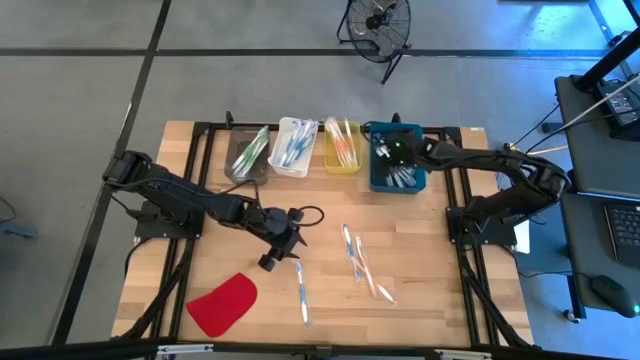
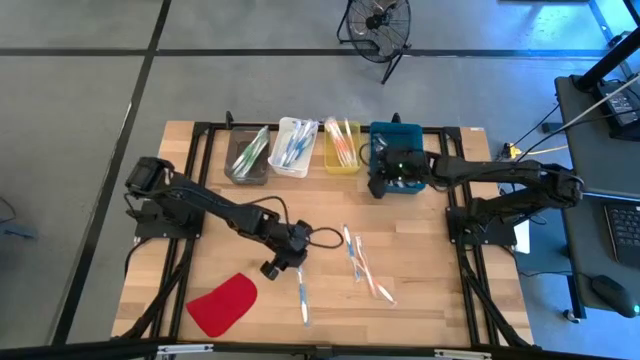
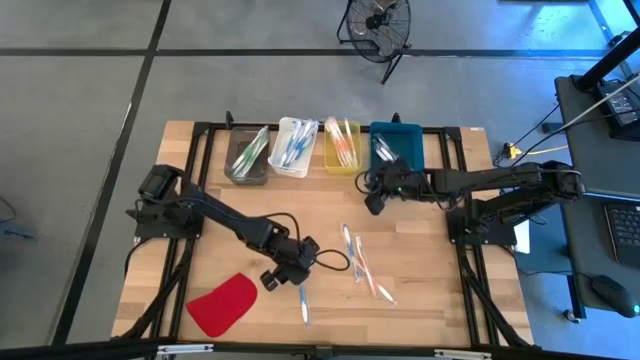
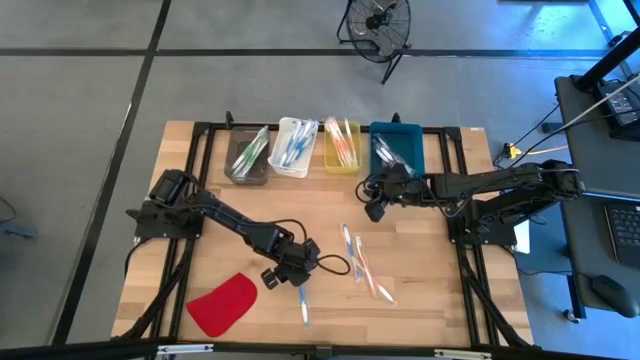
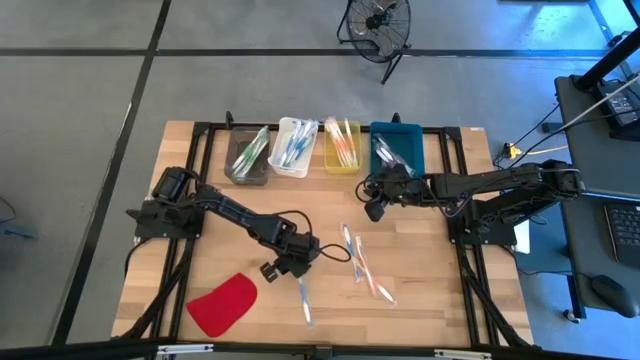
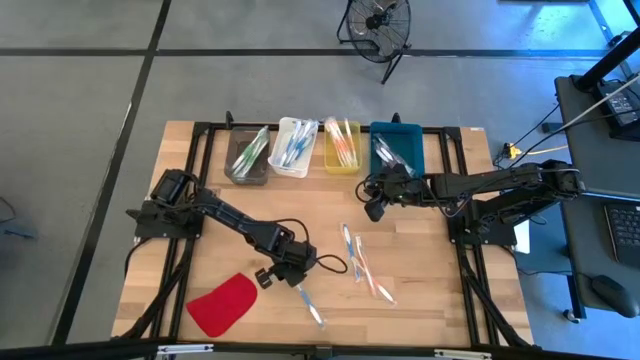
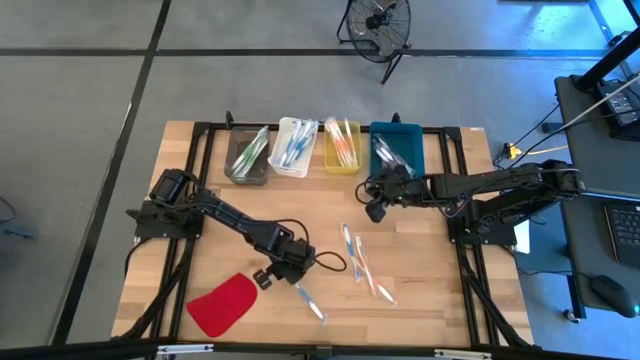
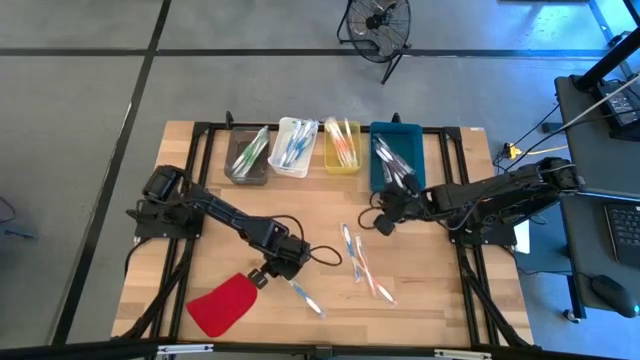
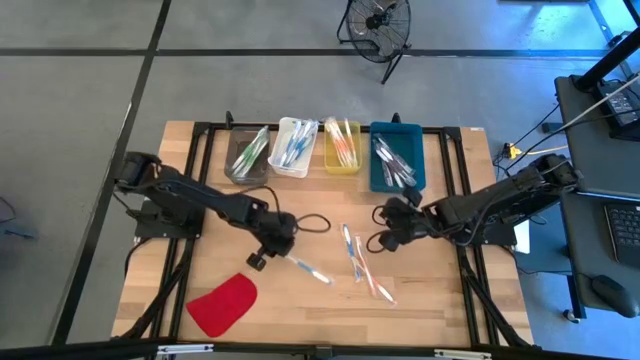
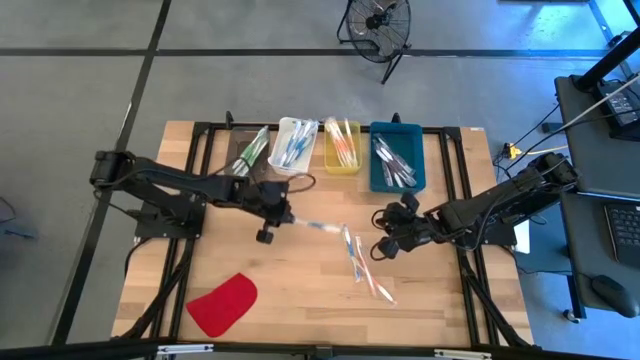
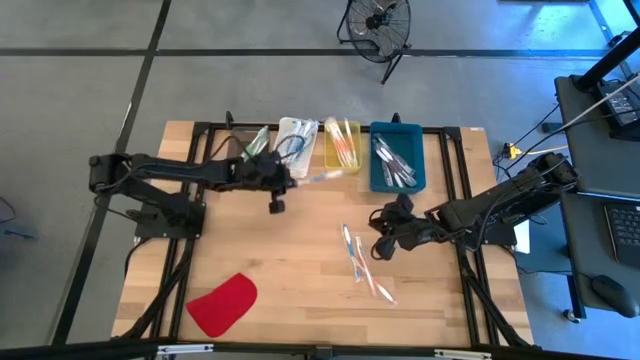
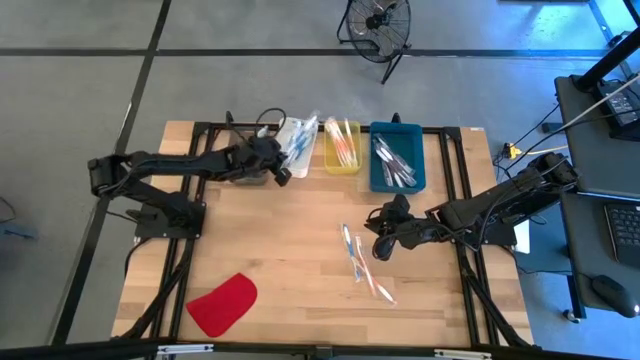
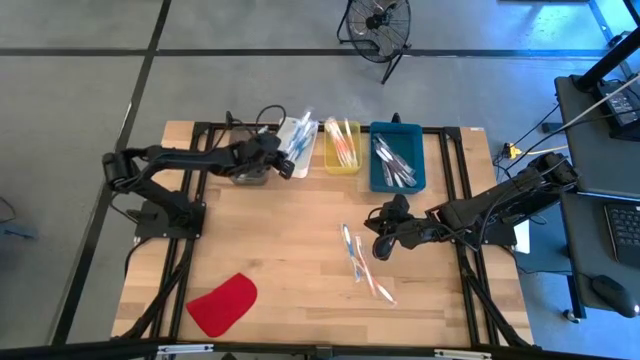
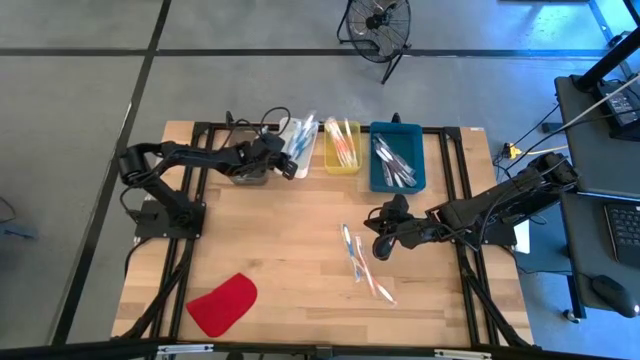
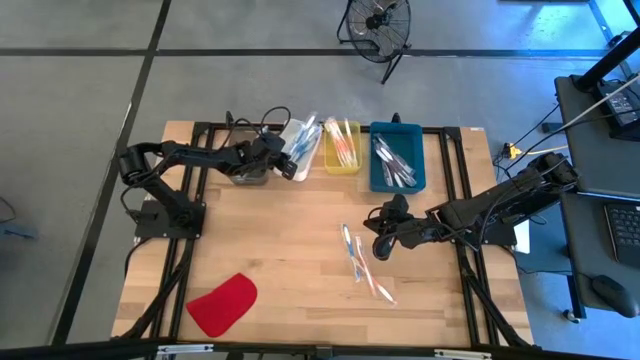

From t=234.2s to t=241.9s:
Task: Pick & Place Toothbrushes
Put the blue toothbrush into the white bin

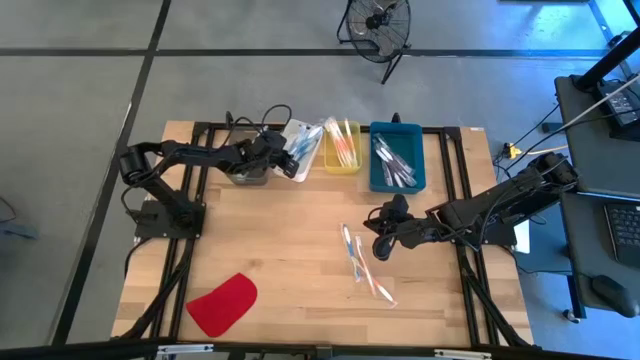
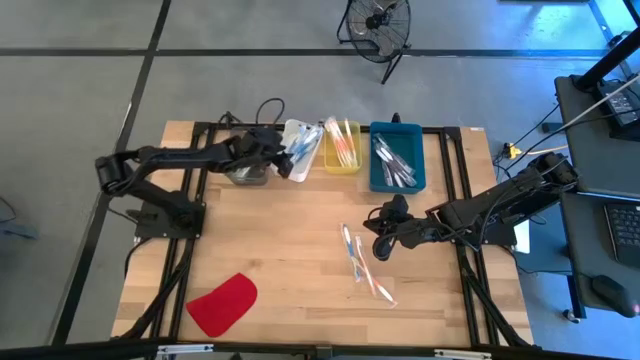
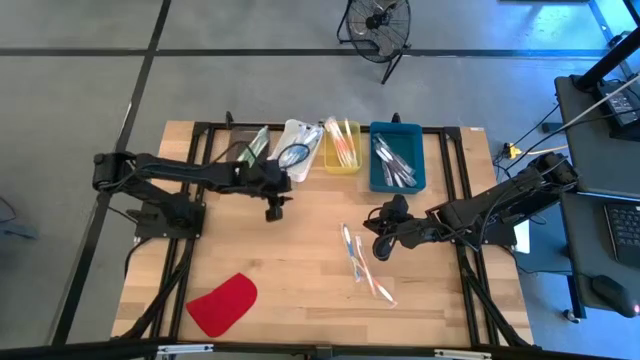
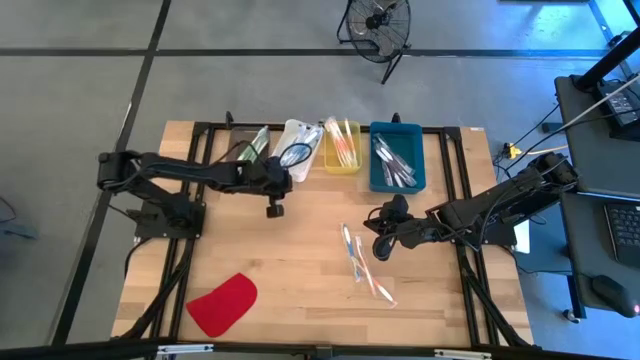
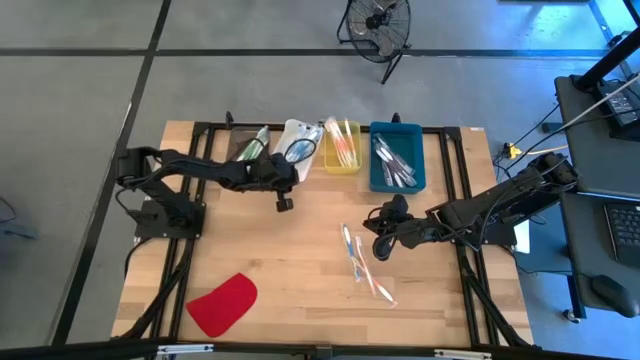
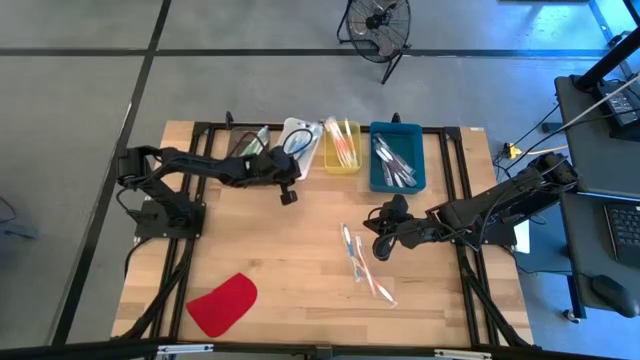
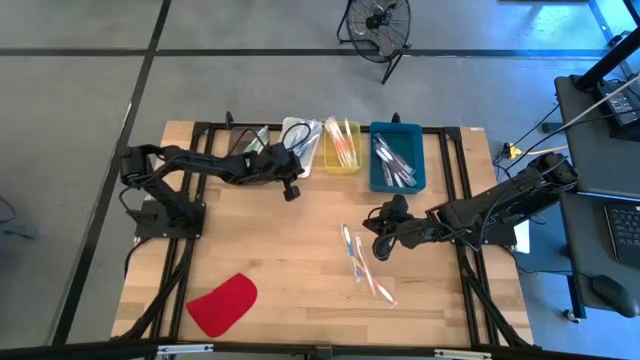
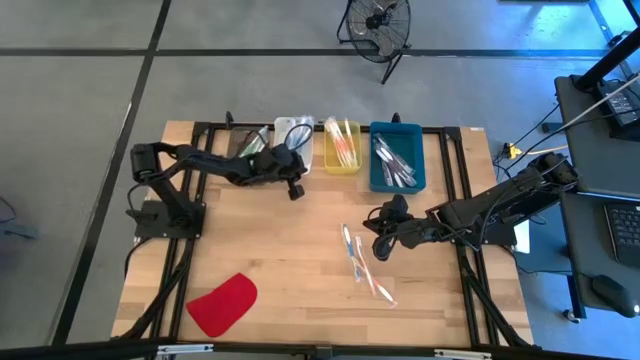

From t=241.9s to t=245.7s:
Adjust the white bin

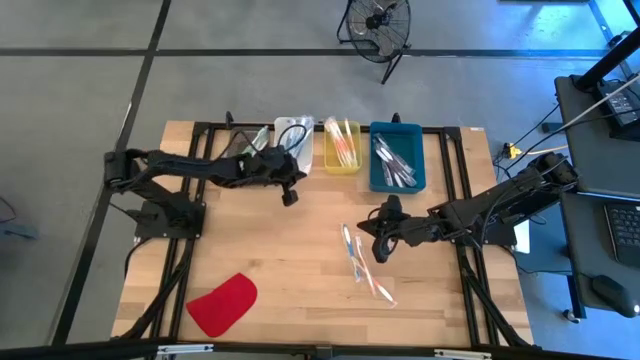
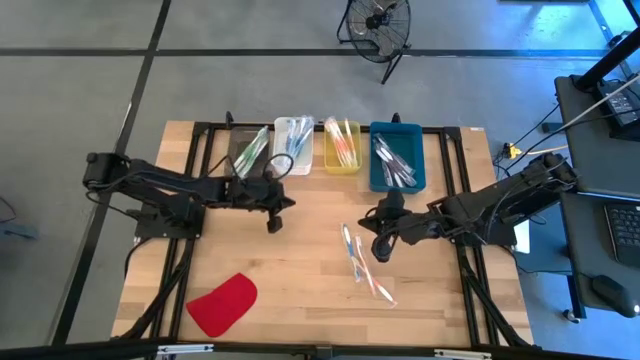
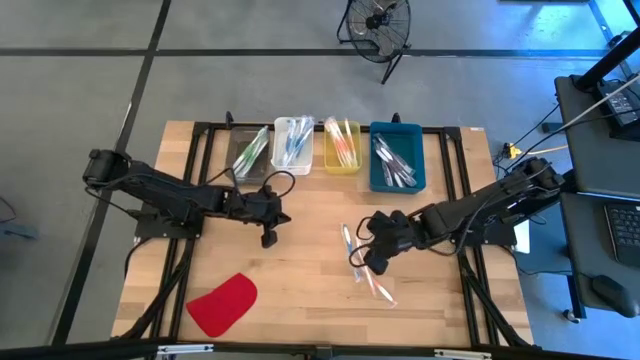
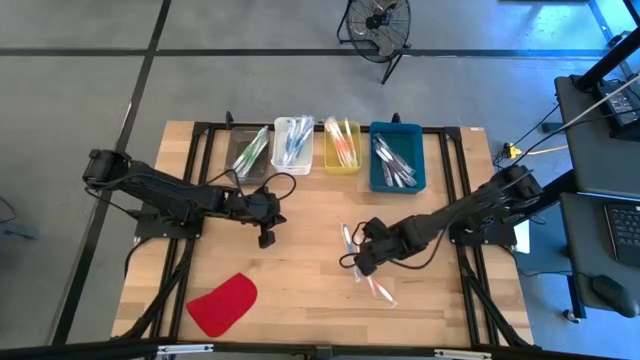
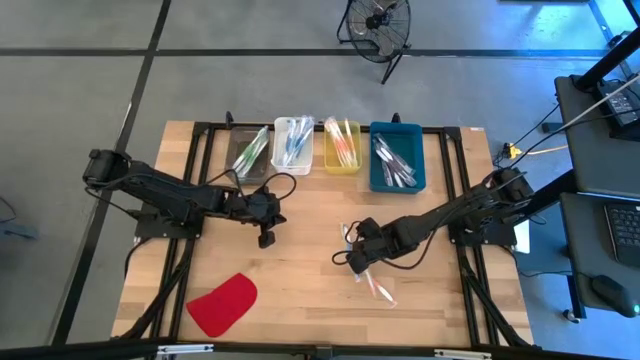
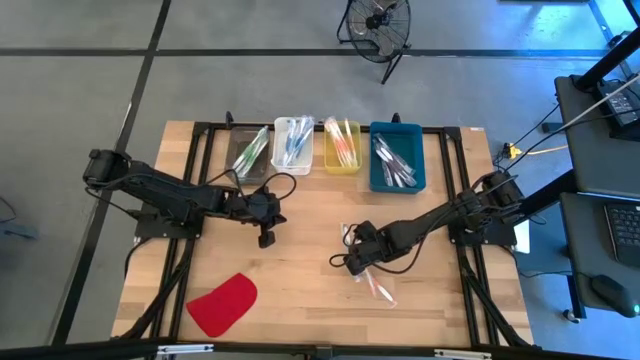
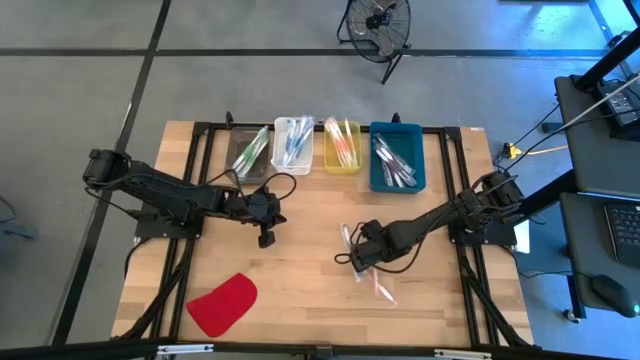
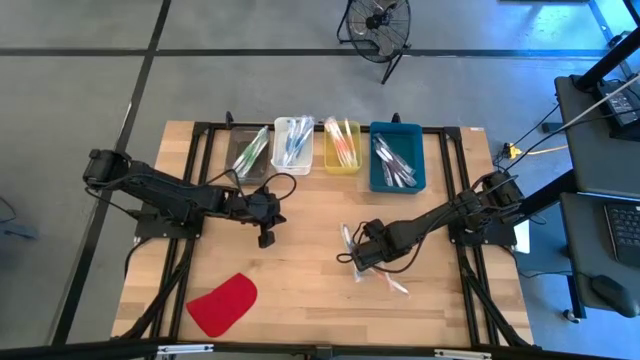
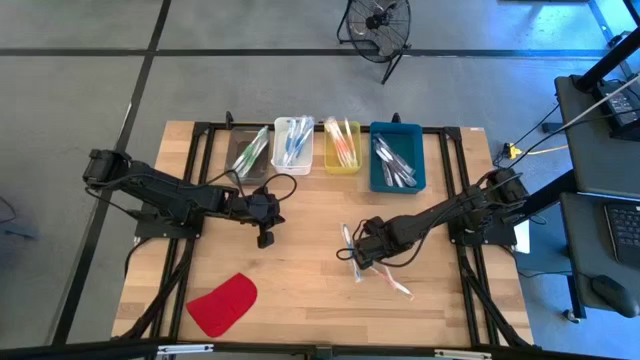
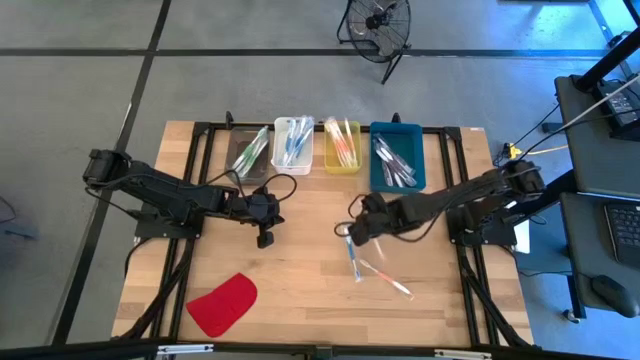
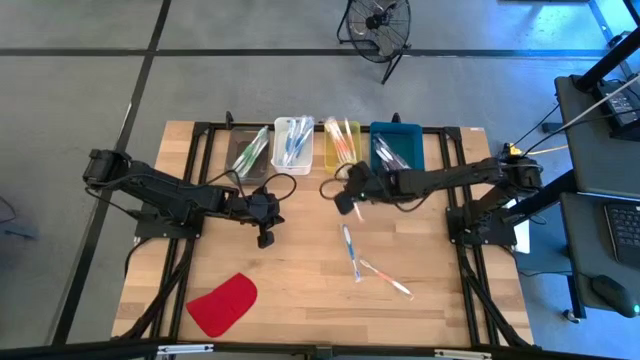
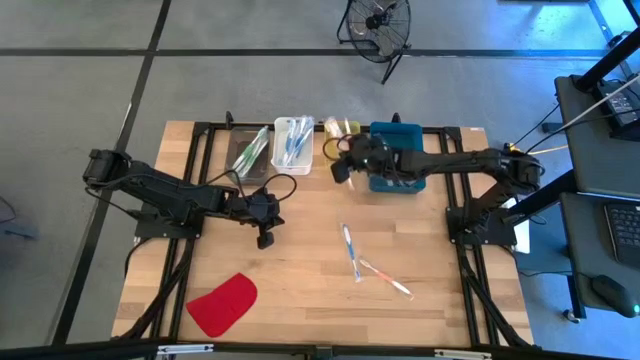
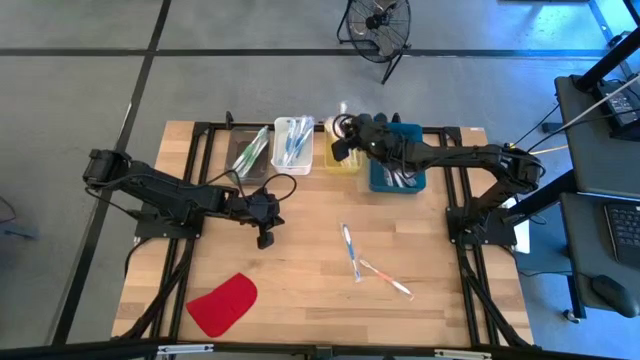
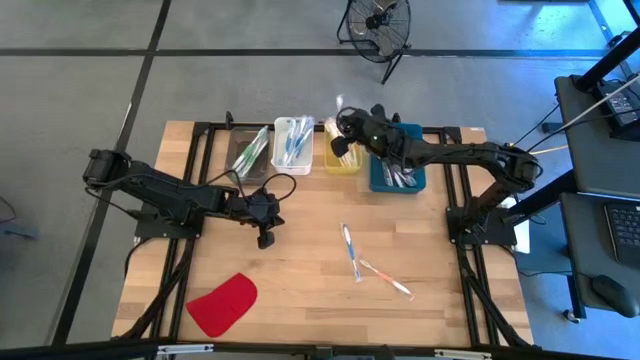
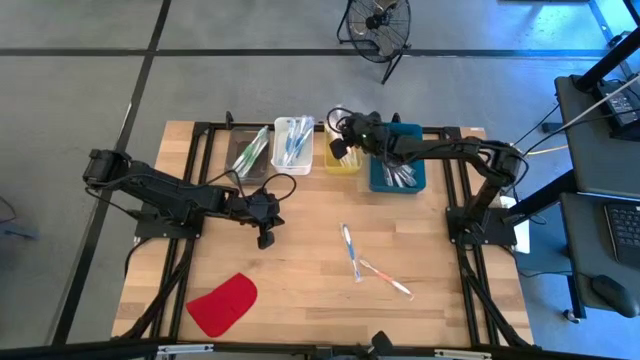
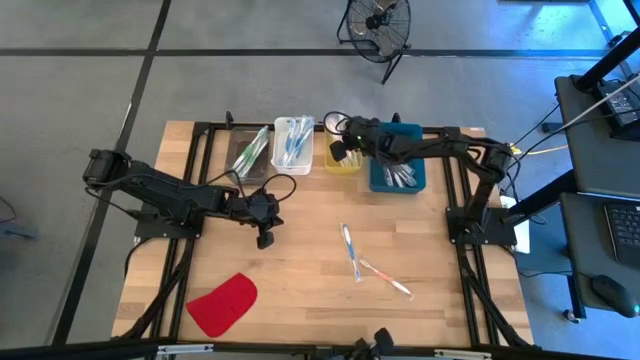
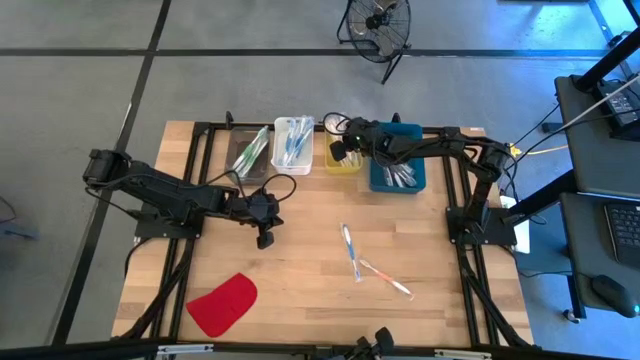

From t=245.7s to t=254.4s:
Put the orange toothbrush into the yellow bin

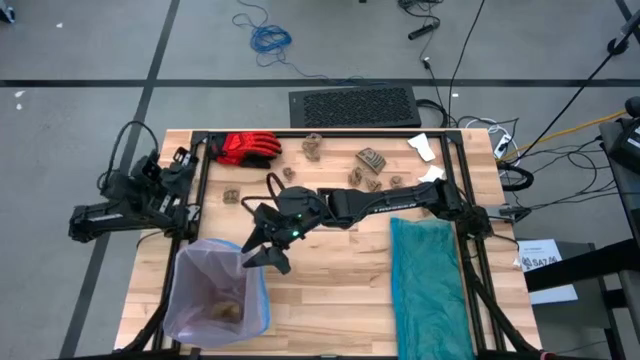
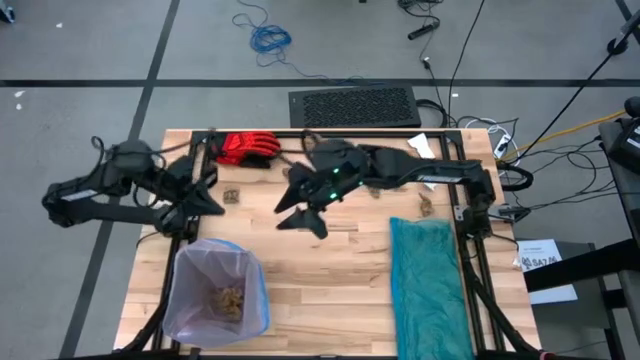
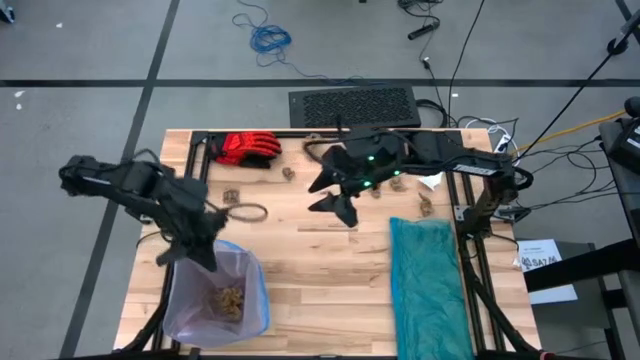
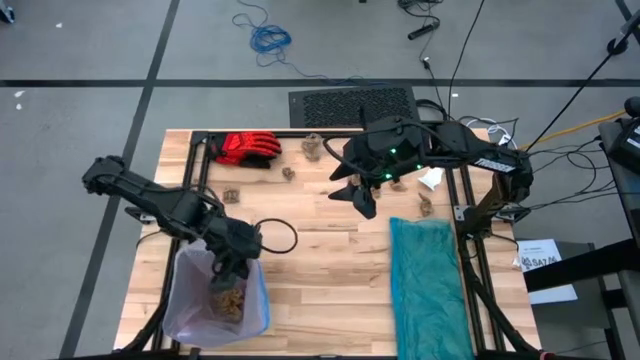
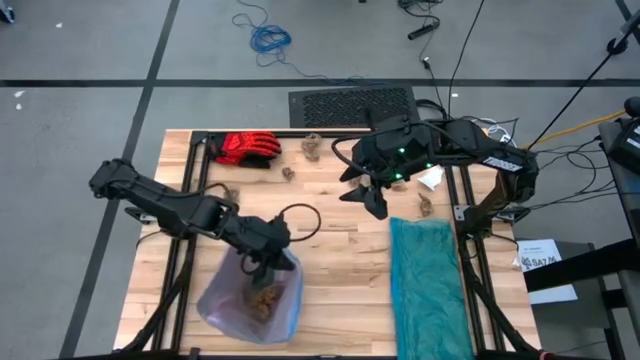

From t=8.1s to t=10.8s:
Task: place trash/remove bag and relplace
Adjust the trash bin
